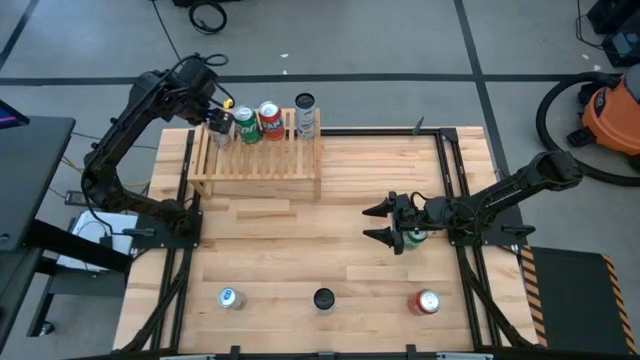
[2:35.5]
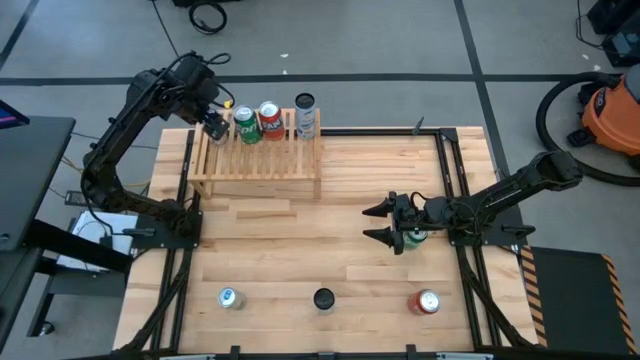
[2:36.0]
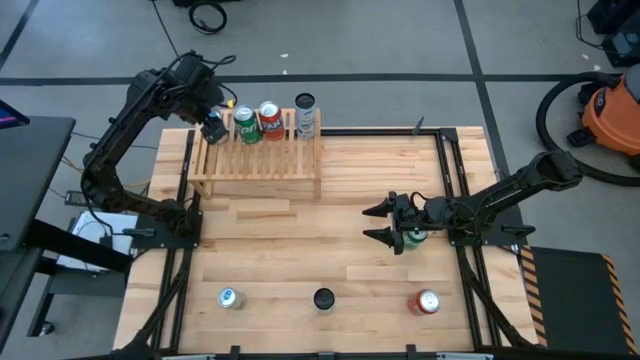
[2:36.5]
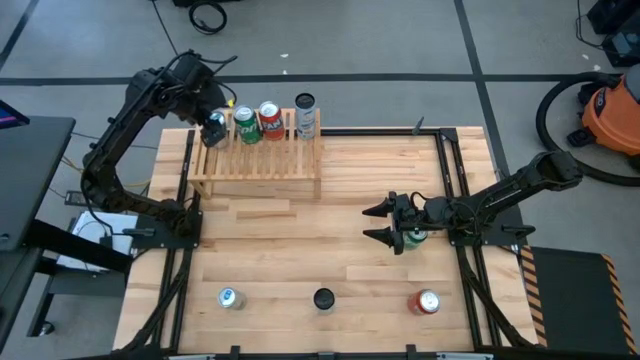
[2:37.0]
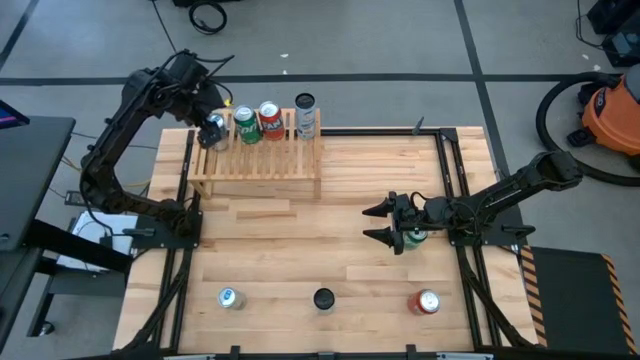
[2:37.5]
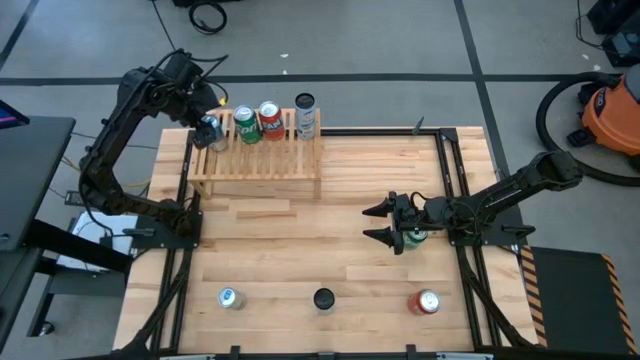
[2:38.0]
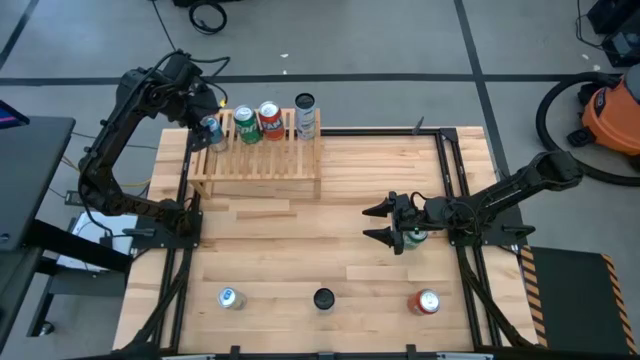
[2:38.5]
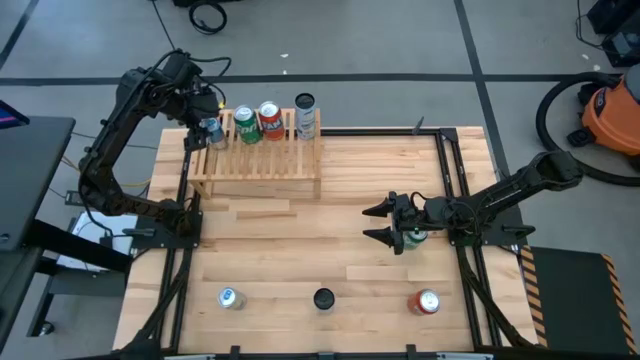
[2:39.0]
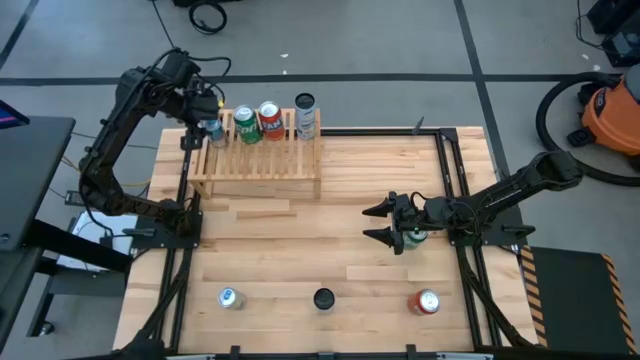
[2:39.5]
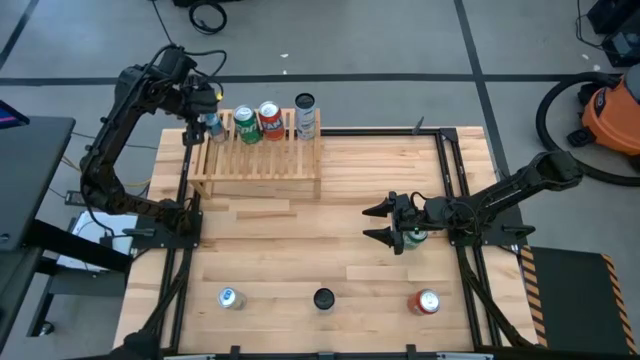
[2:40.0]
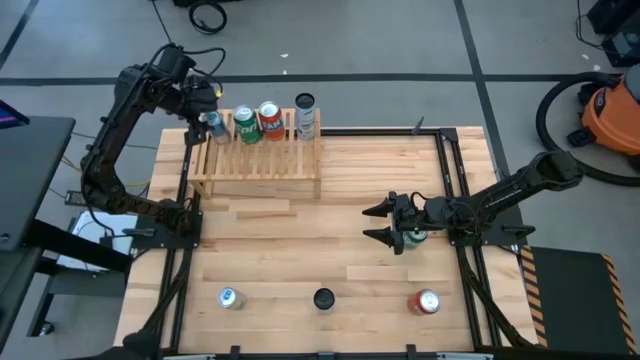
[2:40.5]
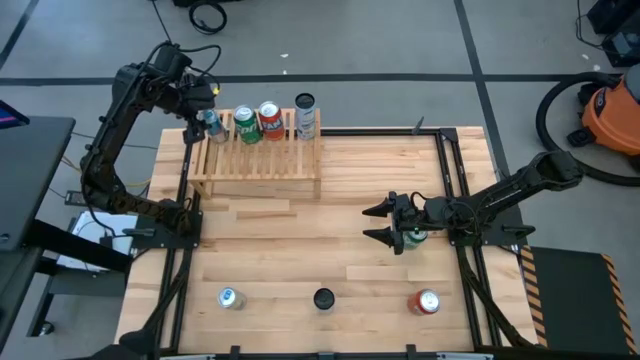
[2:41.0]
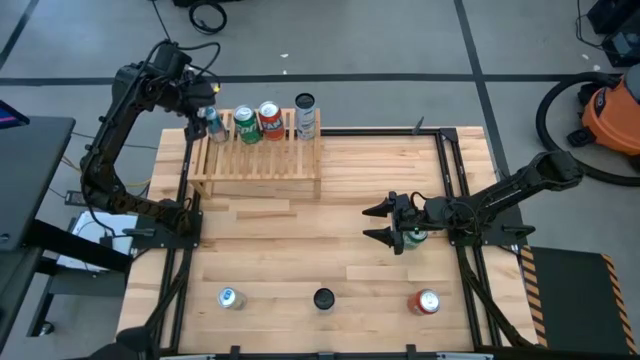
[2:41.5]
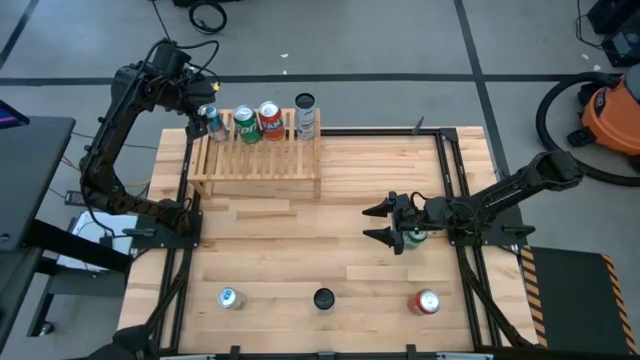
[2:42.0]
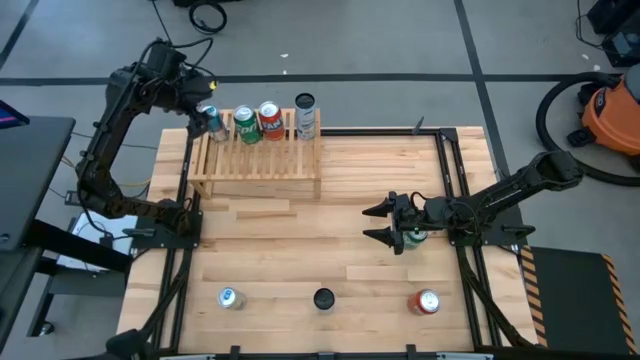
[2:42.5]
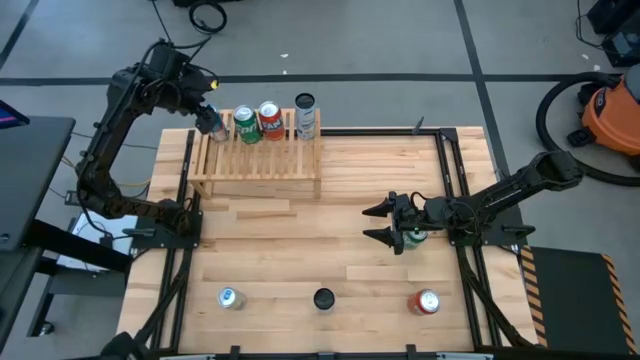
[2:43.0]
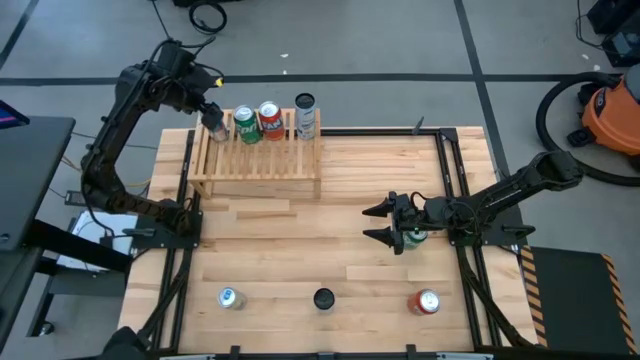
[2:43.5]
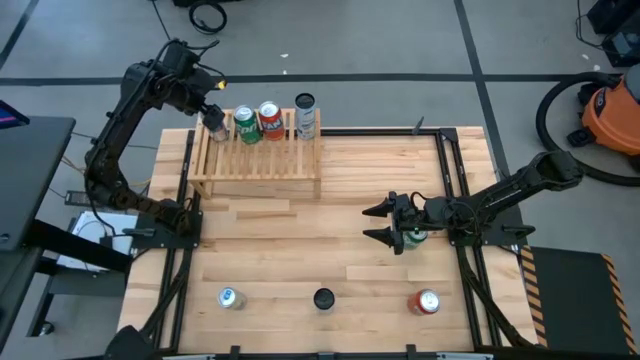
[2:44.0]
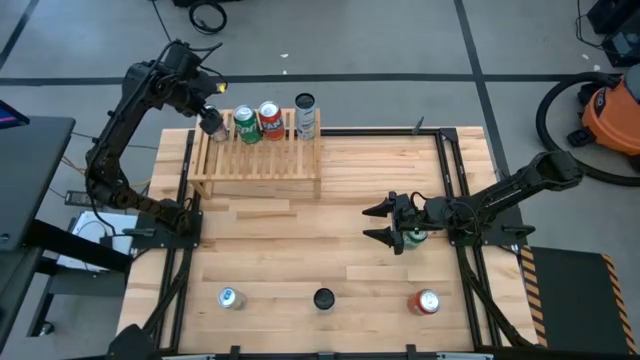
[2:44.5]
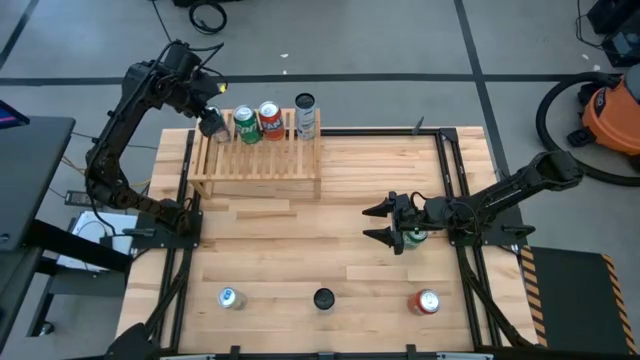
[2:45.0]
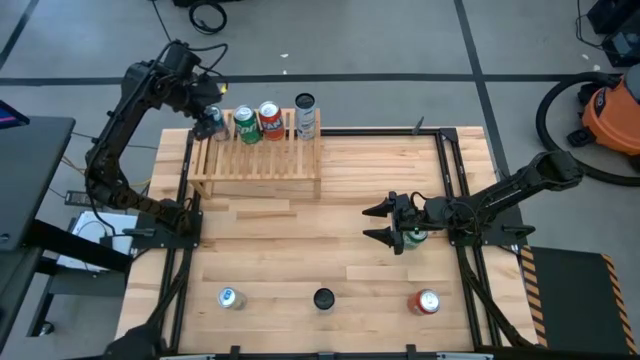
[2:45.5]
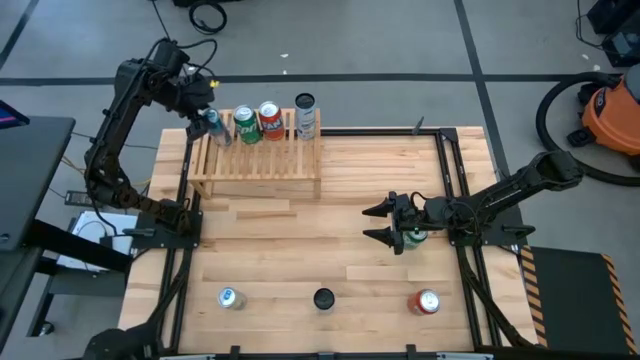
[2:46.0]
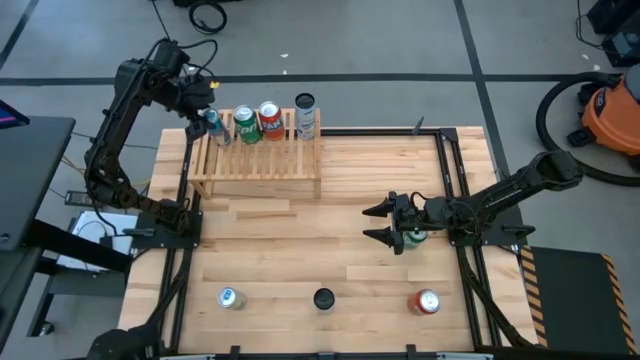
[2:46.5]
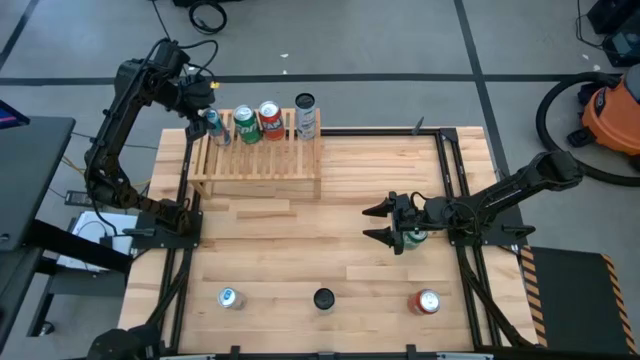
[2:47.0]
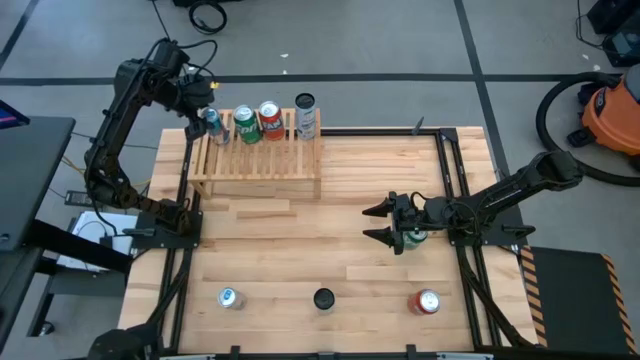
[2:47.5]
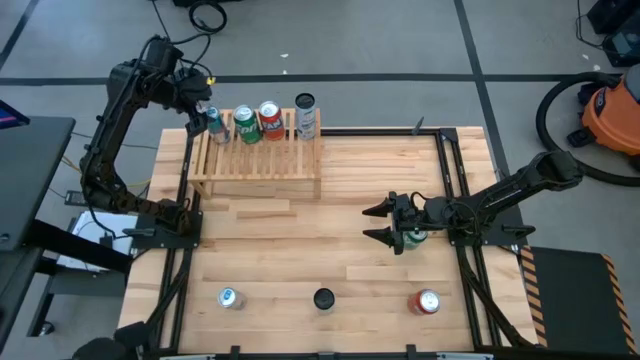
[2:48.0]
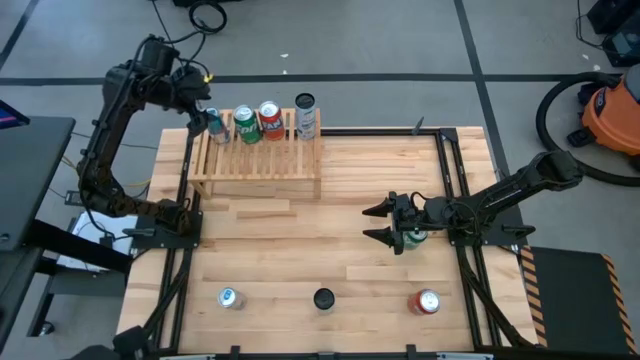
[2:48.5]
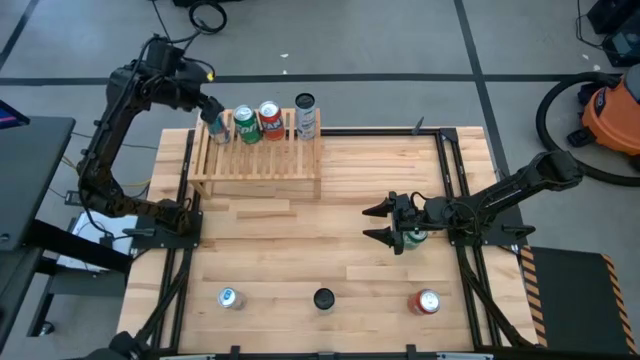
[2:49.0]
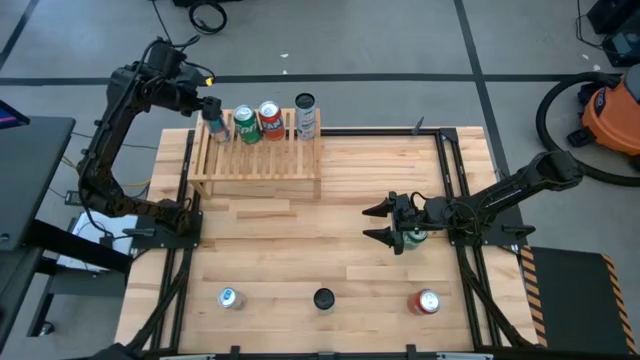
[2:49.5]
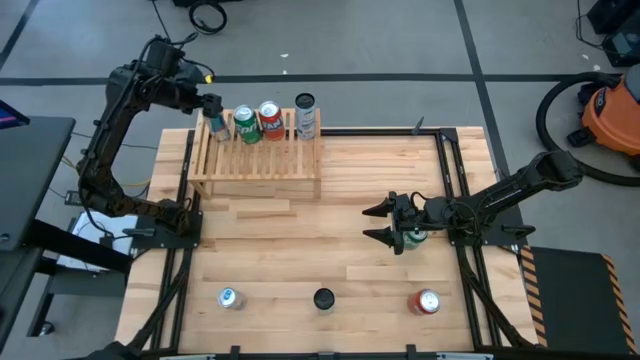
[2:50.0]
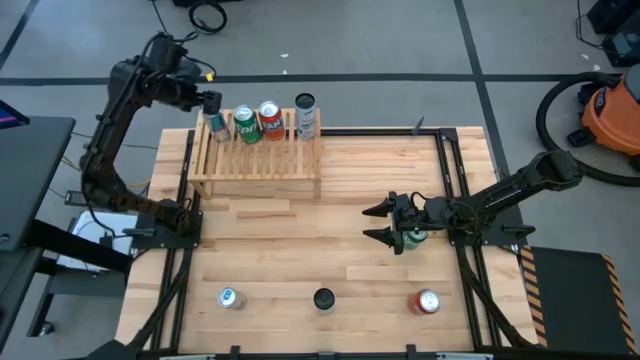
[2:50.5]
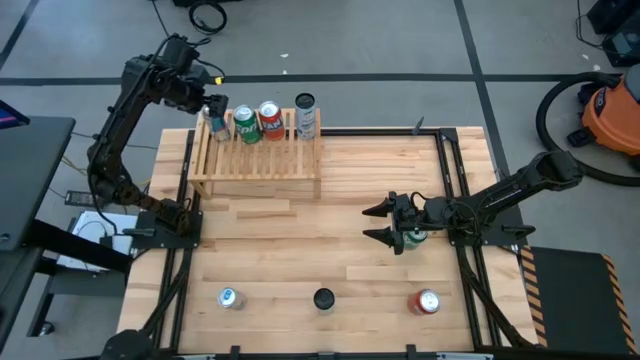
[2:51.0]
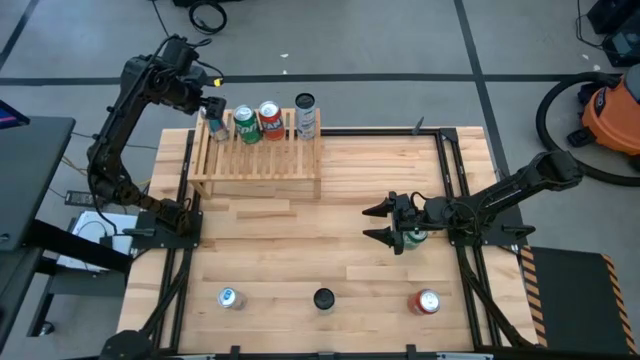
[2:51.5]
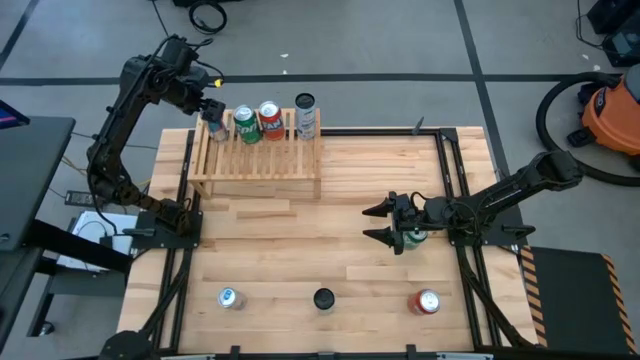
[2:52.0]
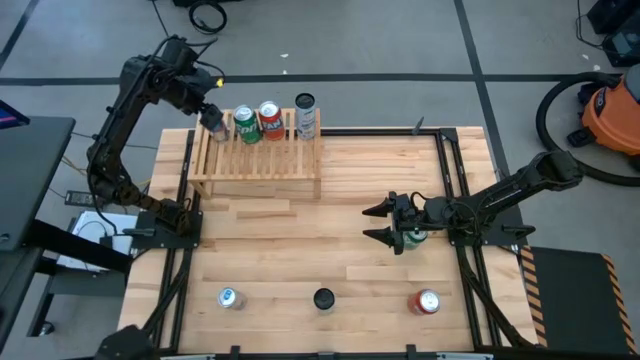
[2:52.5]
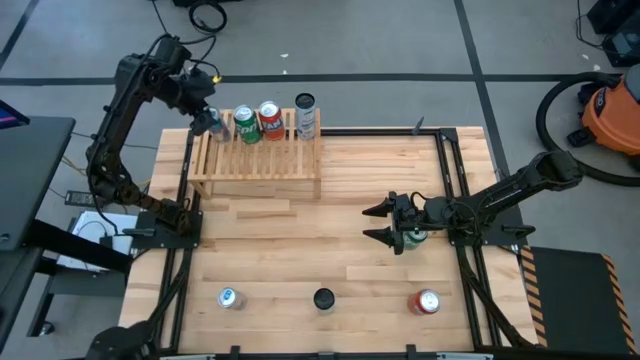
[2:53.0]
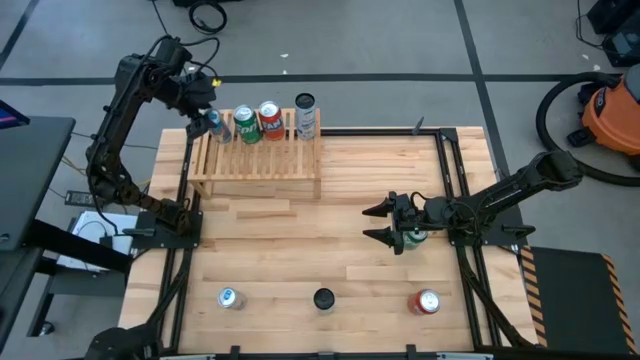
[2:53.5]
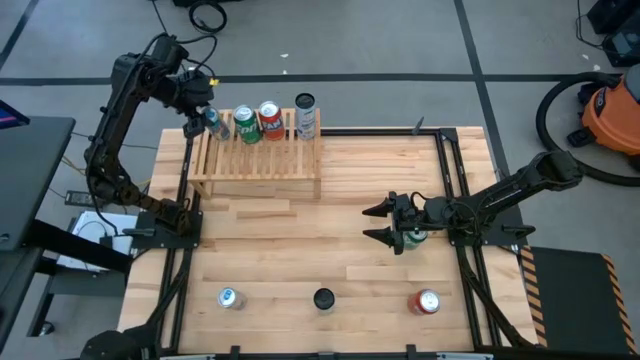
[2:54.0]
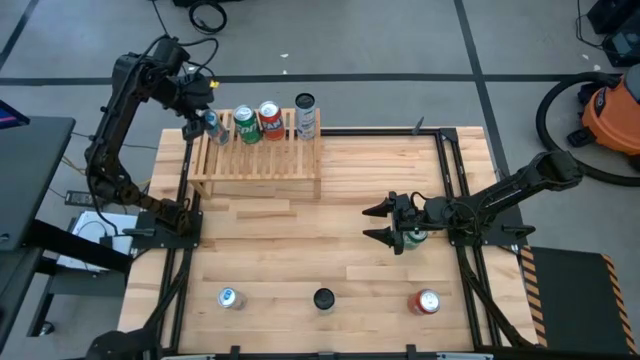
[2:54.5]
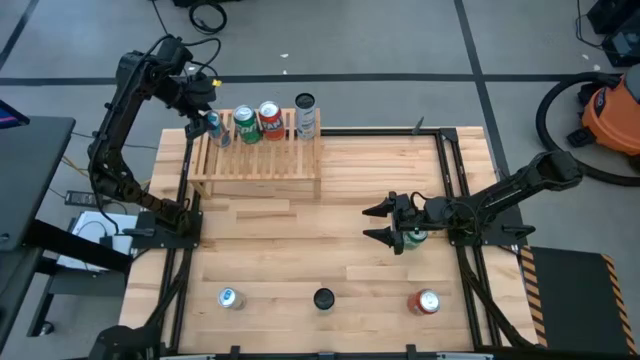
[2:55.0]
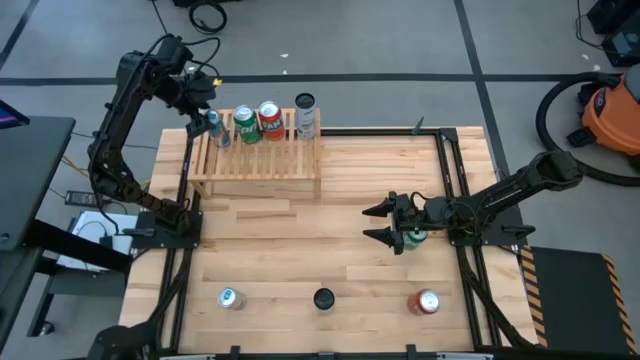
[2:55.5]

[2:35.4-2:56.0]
Task: Place canned beverage on shelf
Put the top blue soda can on the shelf

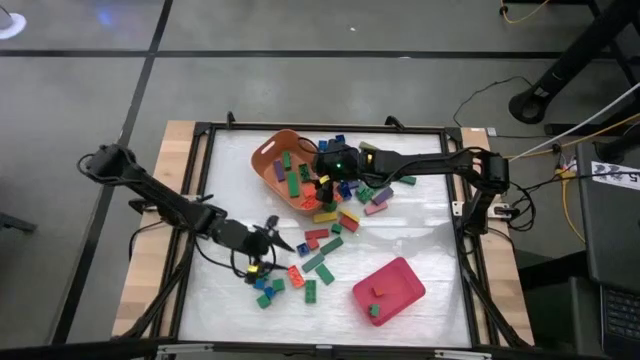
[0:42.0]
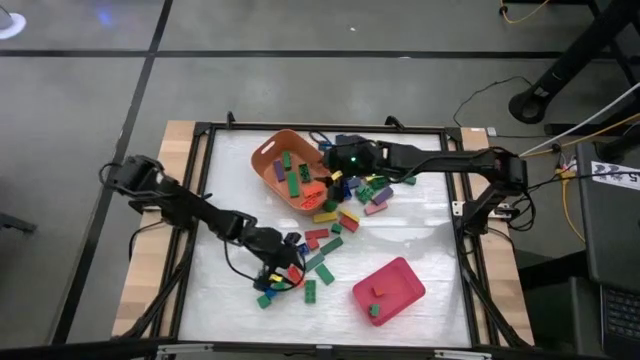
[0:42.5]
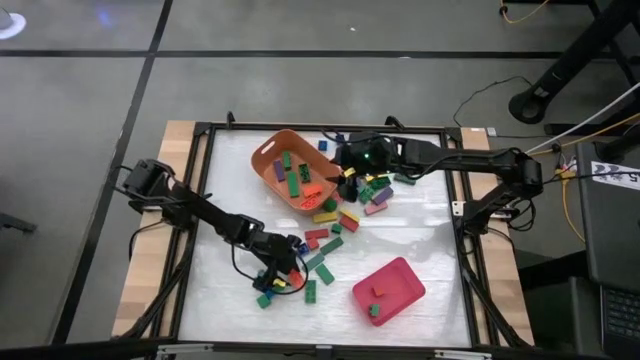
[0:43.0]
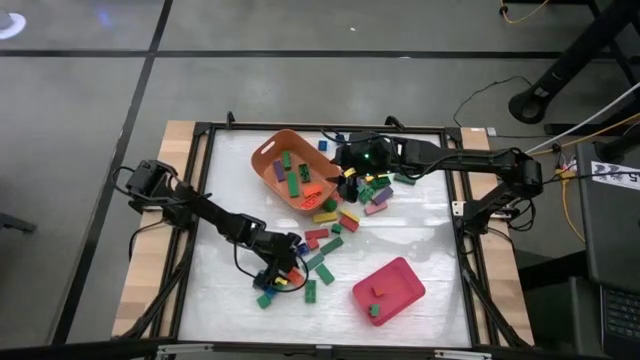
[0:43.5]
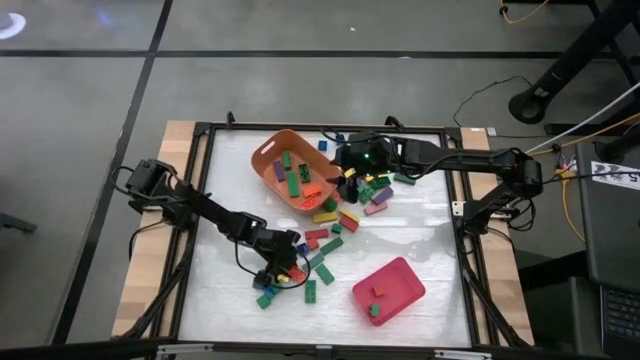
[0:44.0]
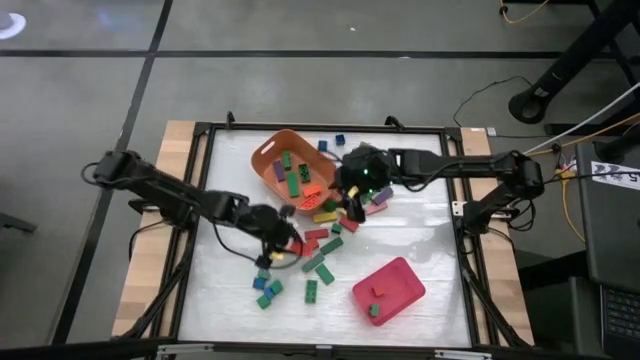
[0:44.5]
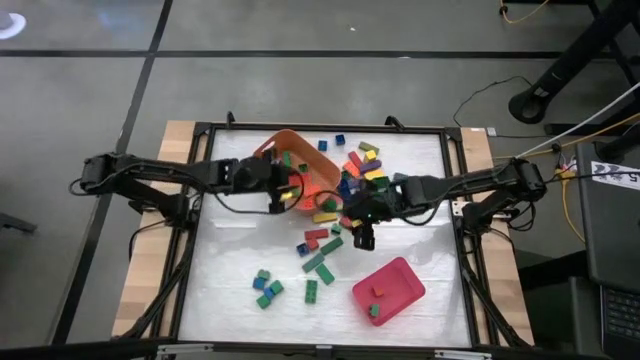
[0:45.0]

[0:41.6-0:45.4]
Task: Sort blocks by size
Put the large orange game piece into the orange bin
